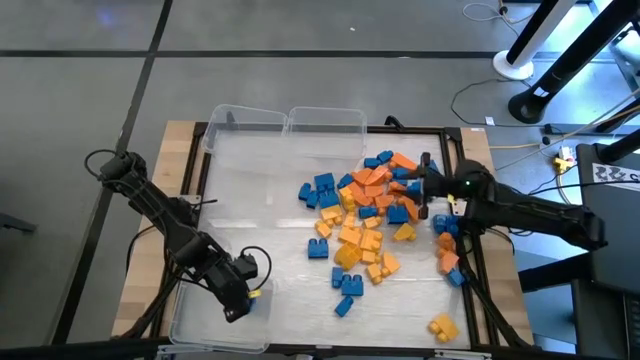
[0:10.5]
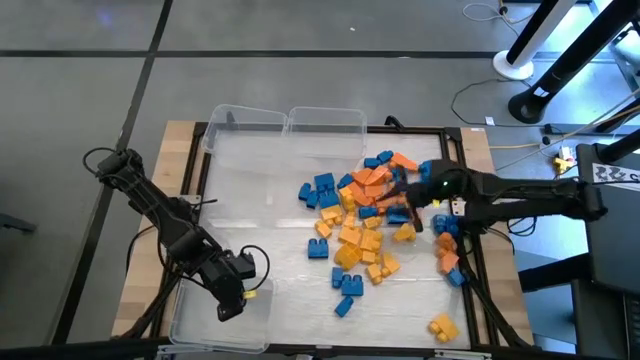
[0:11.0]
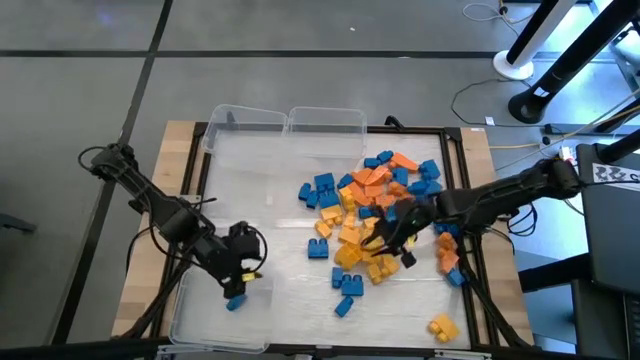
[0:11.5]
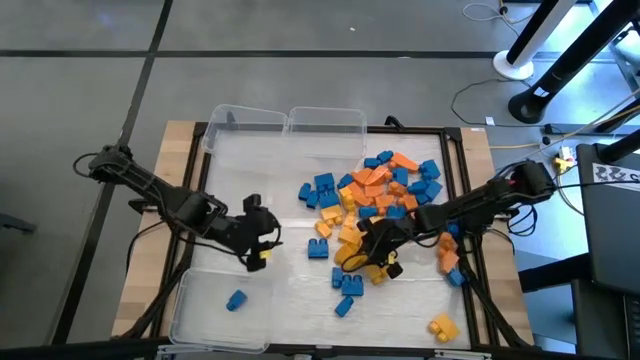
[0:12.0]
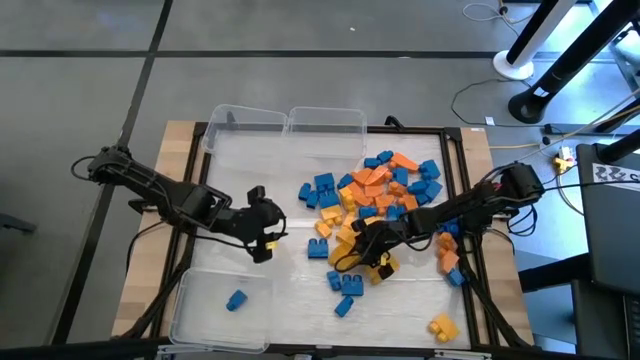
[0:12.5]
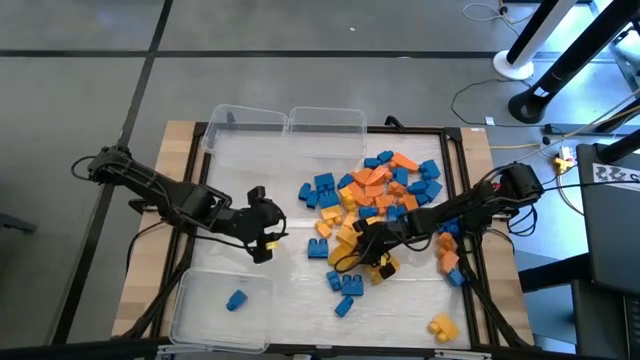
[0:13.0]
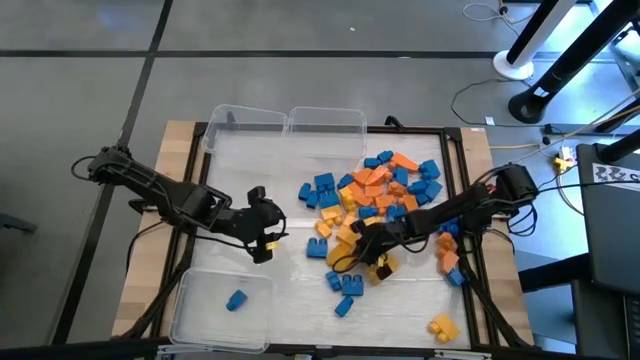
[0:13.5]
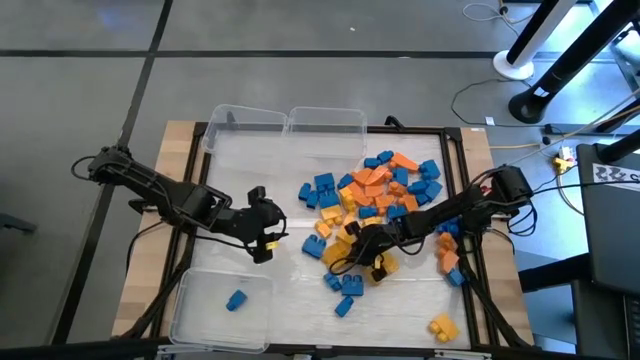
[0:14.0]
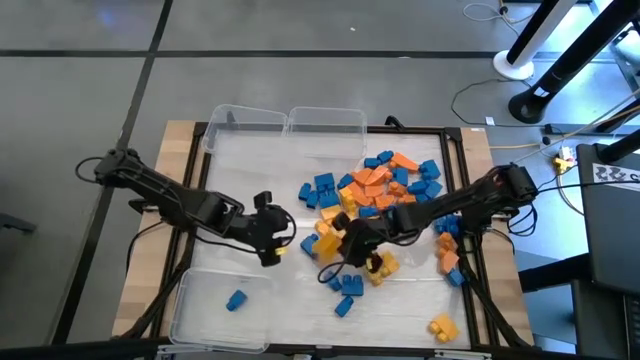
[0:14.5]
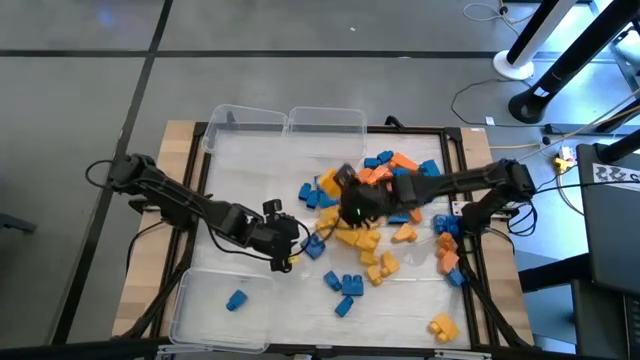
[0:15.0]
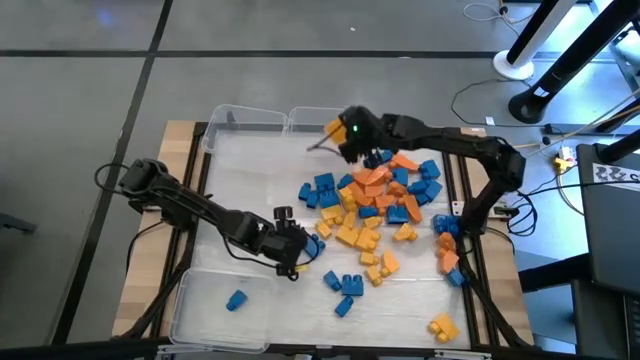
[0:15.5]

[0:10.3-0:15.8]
Task: Sort blocks
Put the yellow game piece into the top right transparent bin

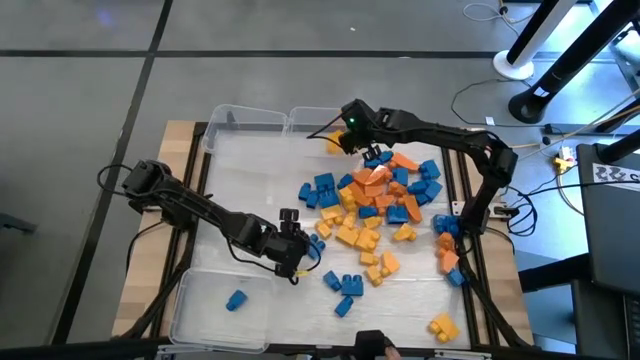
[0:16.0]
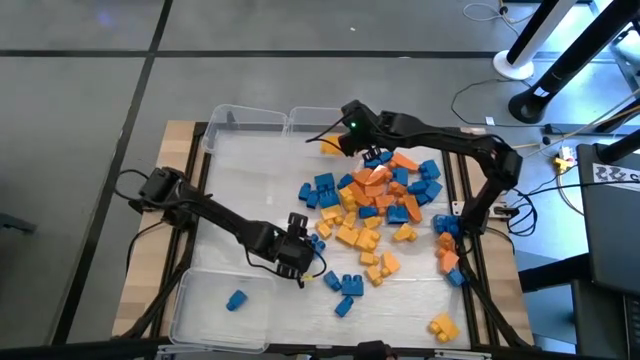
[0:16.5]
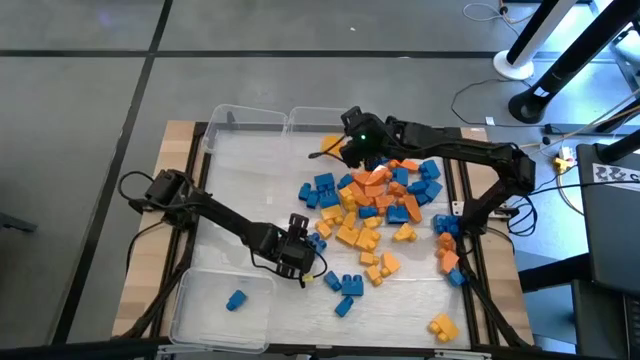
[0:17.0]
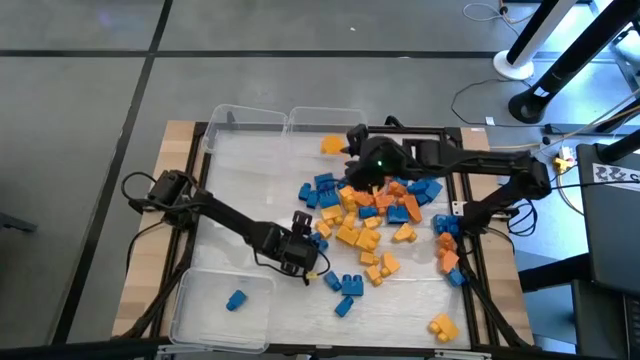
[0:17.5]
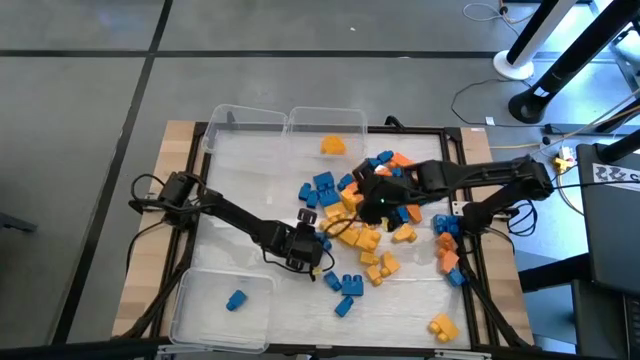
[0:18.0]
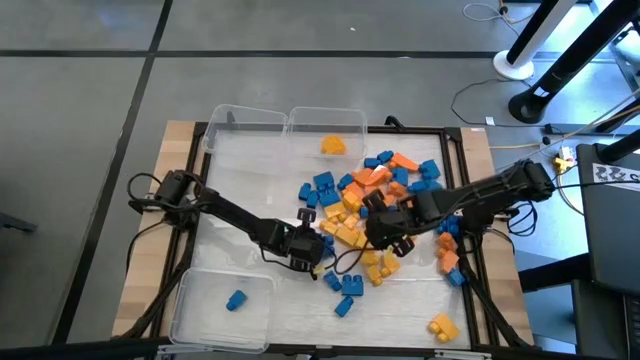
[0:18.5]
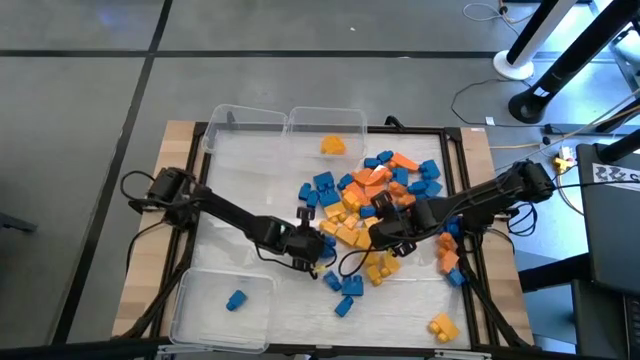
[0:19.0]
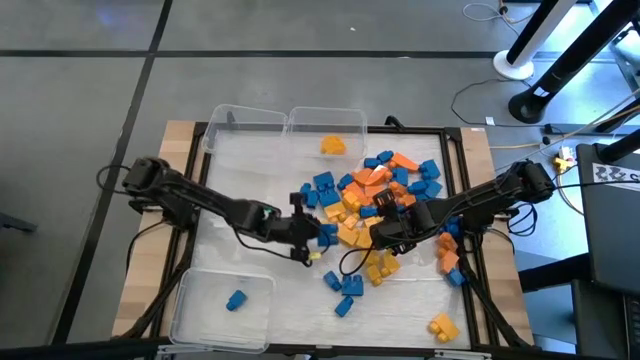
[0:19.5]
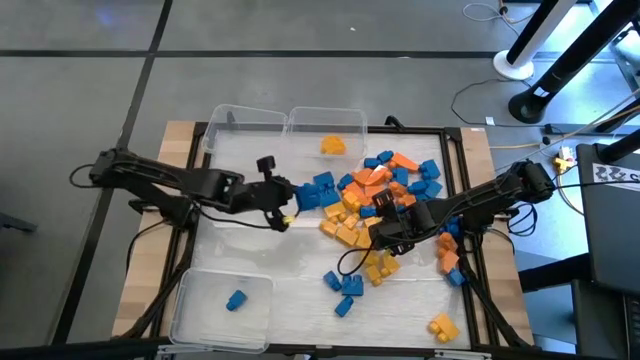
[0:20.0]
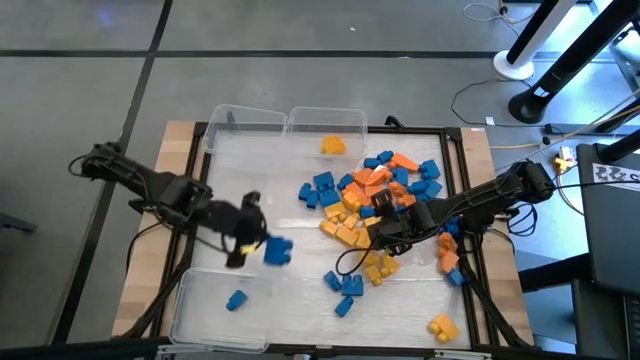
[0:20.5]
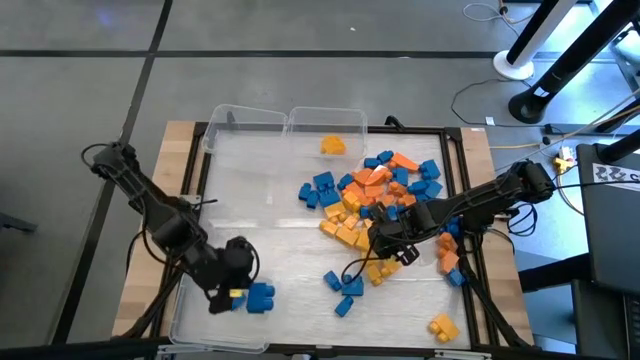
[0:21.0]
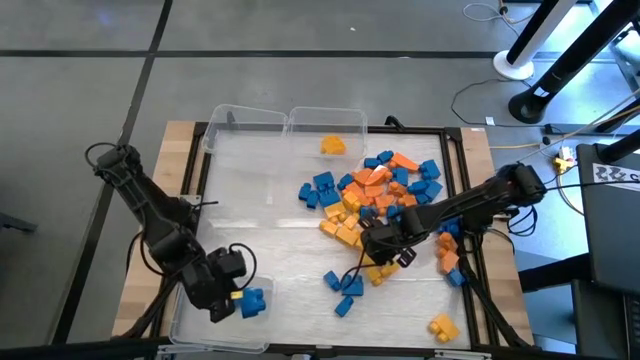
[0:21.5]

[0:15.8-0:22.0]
Put the blue game piece into the bottom transparent bin

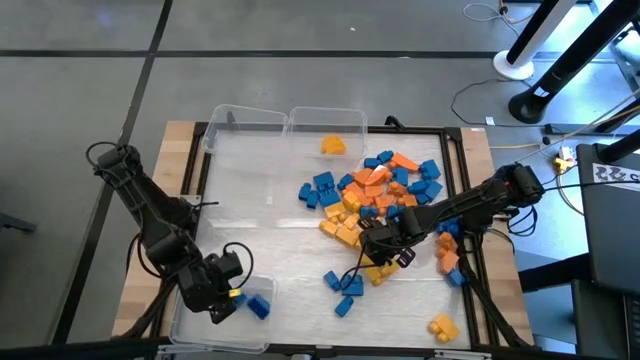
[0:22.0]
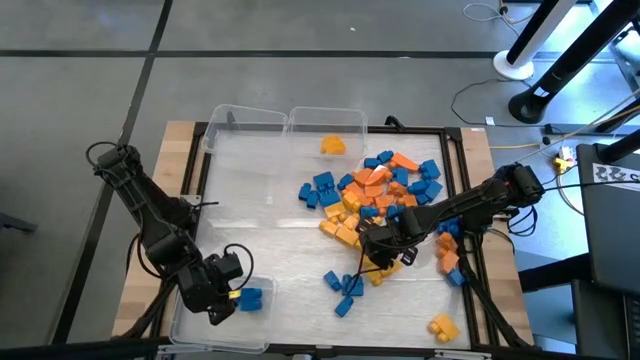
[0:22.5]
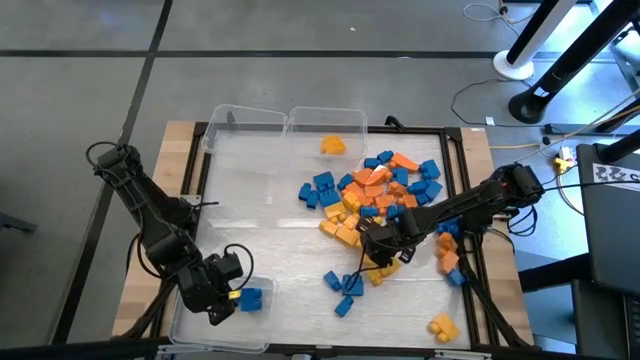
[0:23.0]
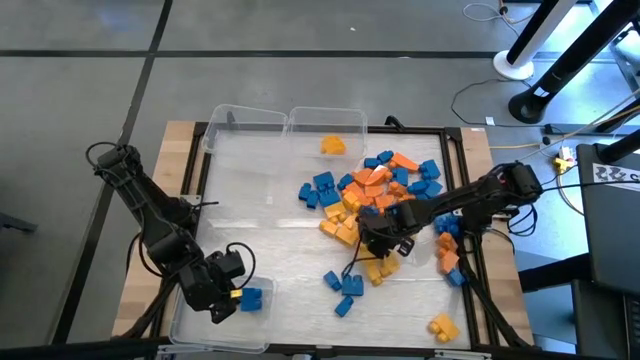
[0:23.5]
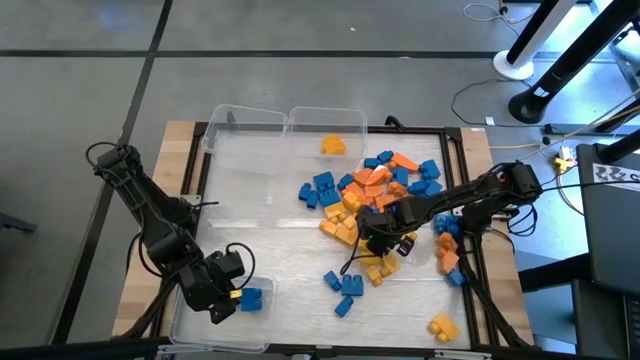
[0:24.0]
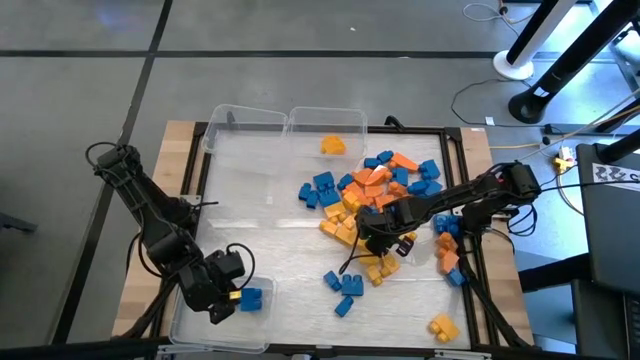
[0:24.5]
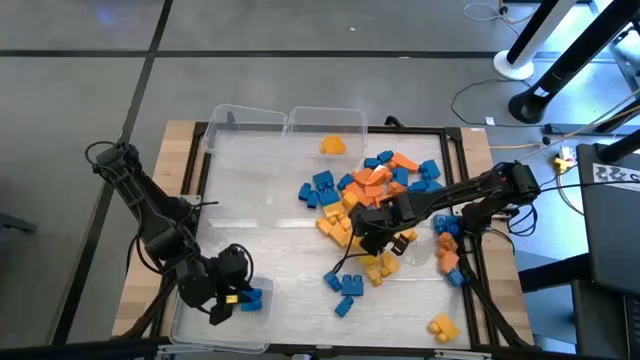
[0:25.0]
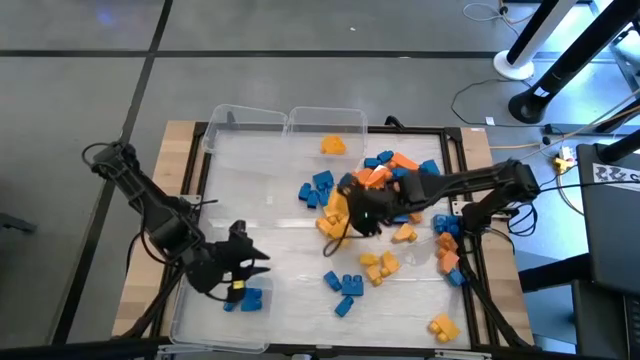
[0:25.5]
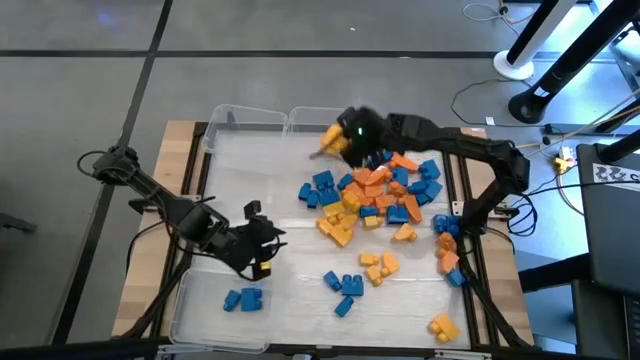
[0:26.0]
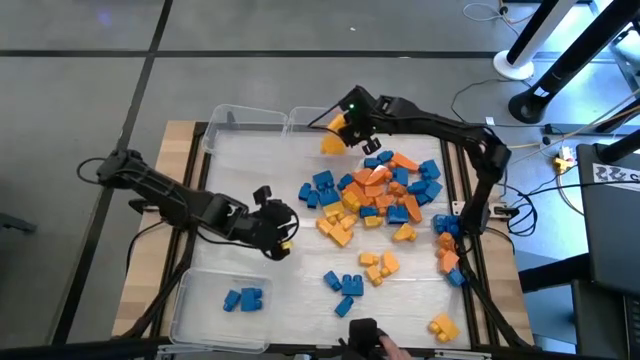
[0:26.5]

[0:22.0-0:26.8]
Put the yellow game piece into the top right transparent bin

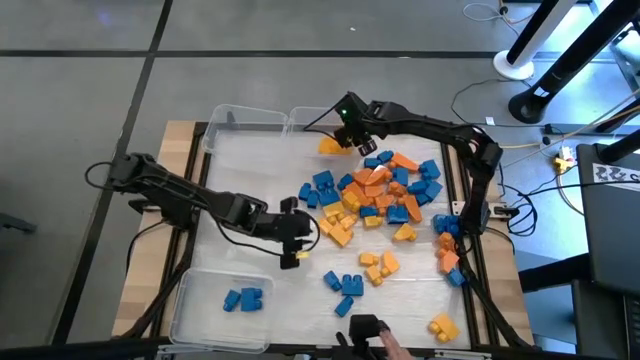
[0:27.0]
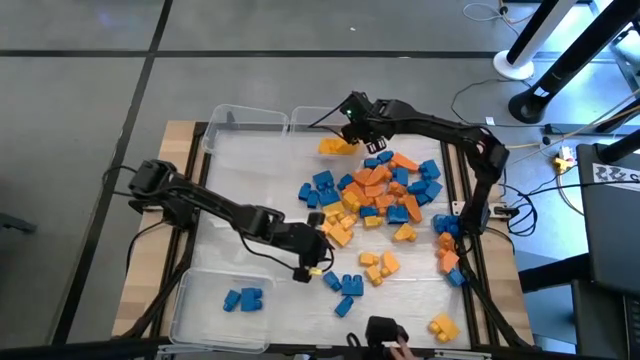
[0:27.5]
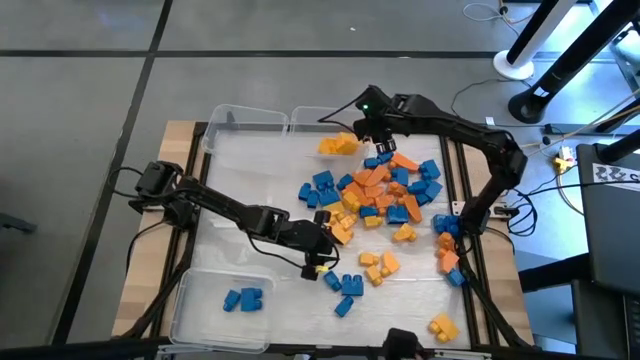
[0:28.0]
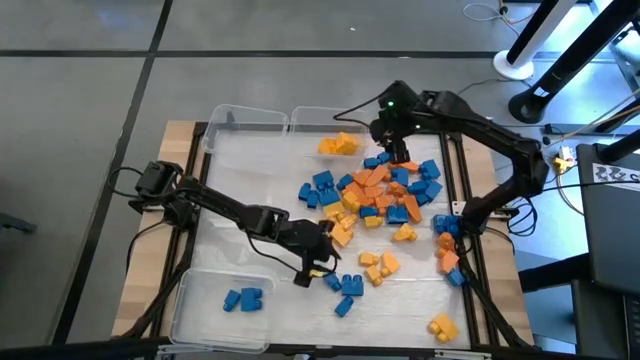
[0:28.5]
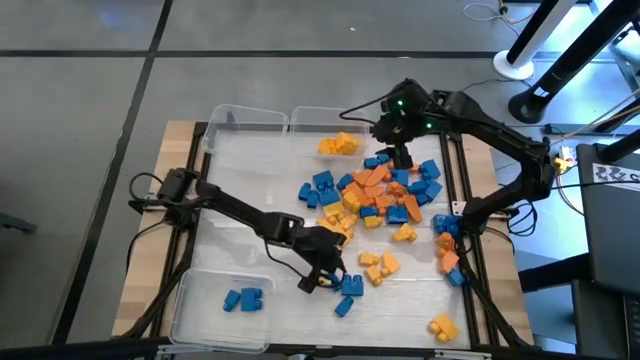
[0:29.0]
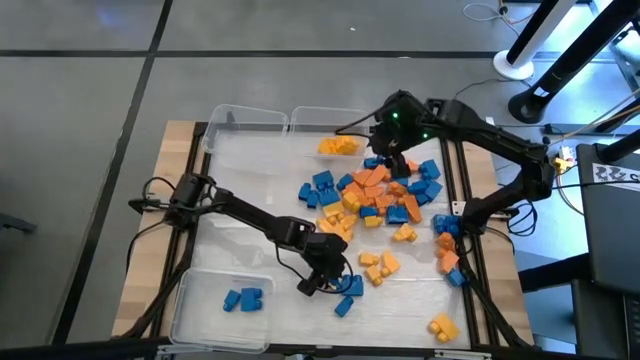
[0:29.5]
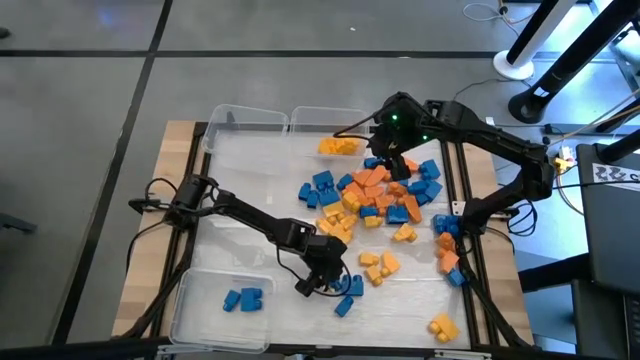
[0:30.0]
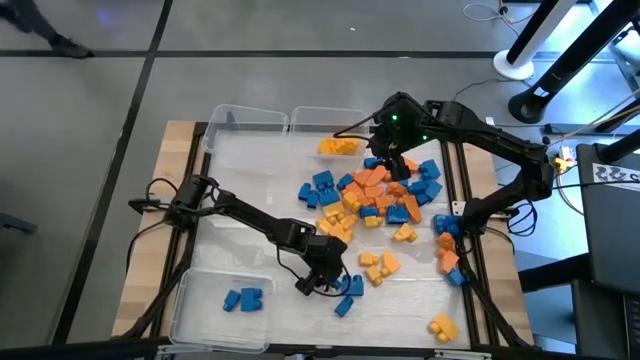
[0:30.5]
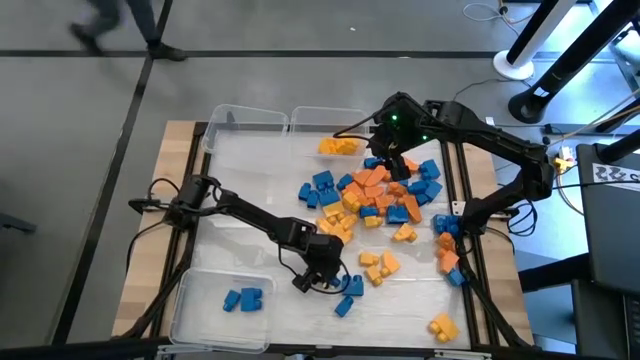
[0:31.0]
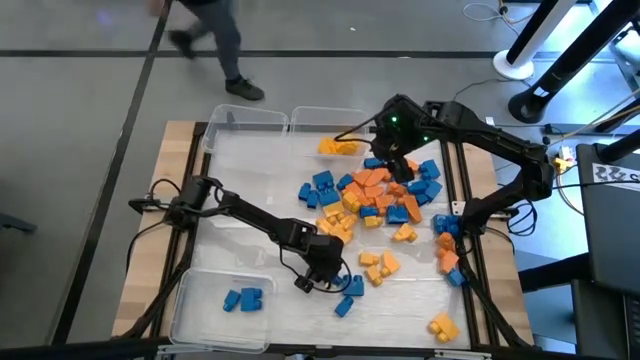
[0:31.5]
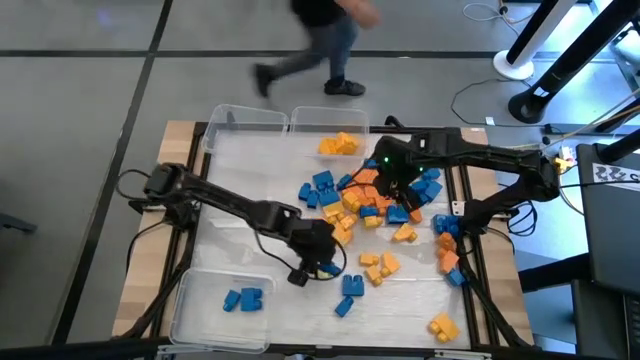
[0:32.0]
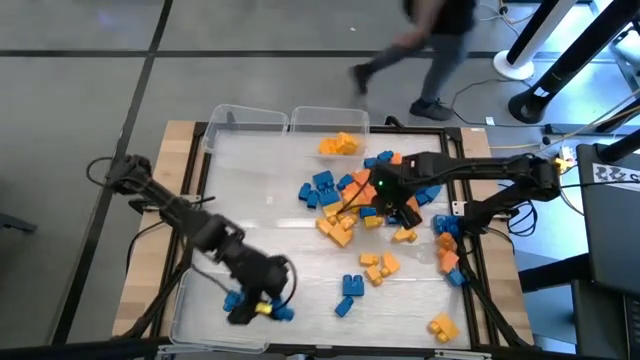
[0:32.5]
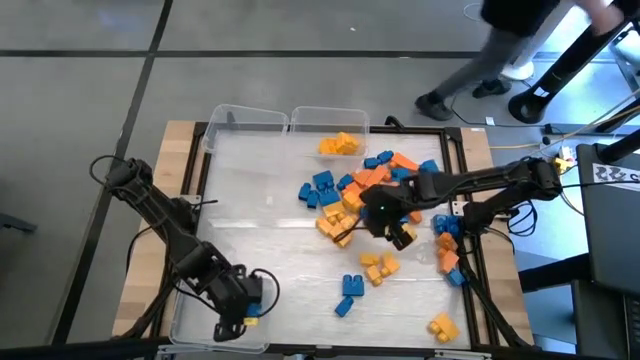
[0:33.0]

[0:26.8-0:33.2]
Put the blue game piece into the bottom transparent bin
